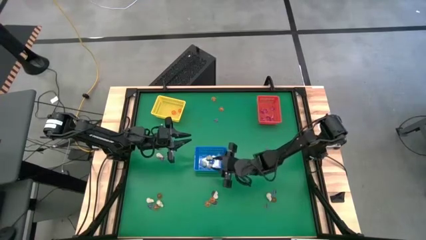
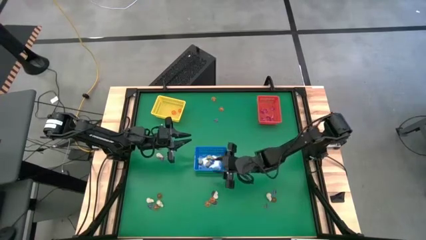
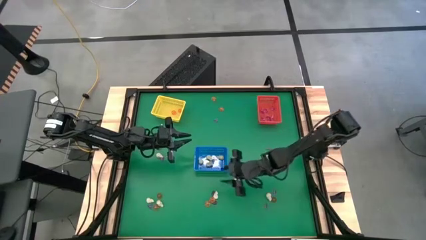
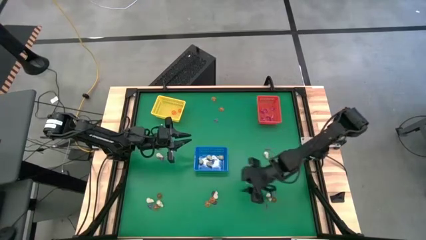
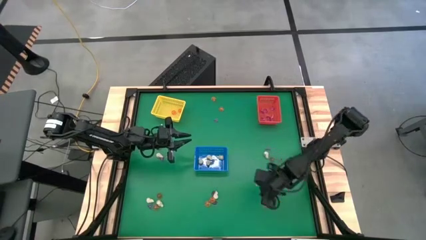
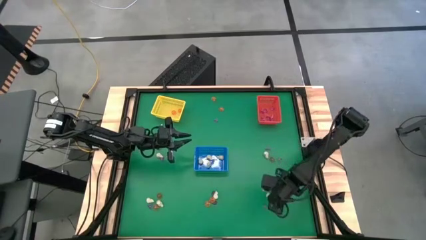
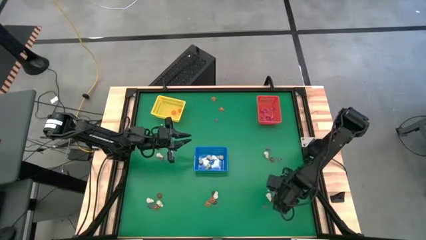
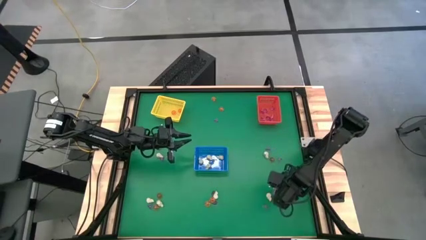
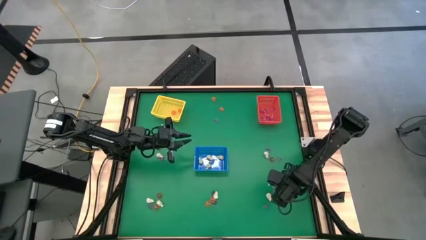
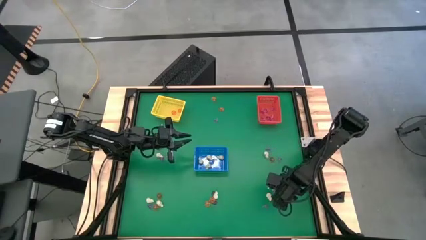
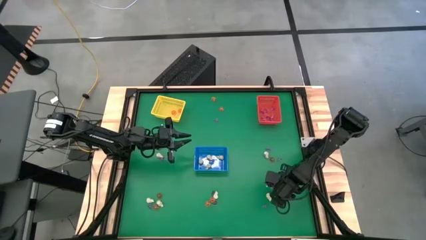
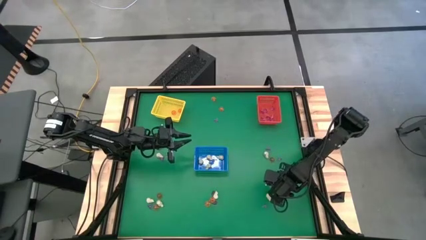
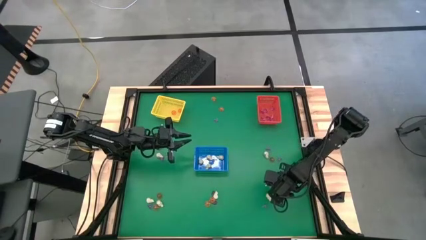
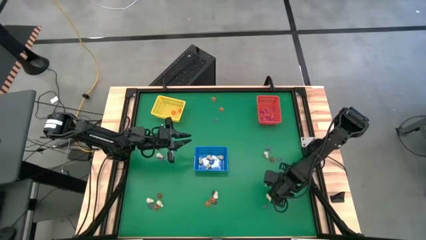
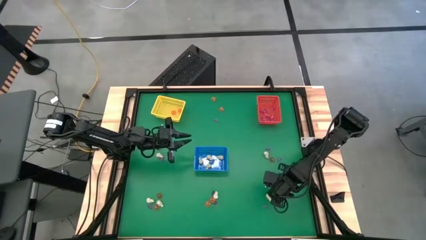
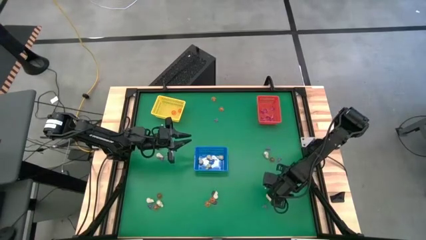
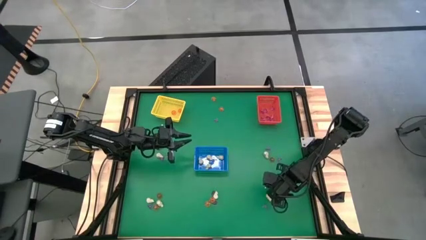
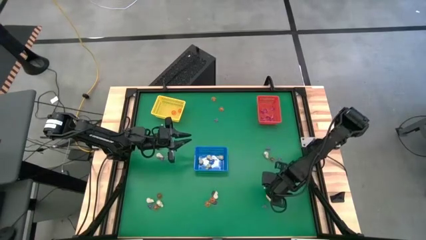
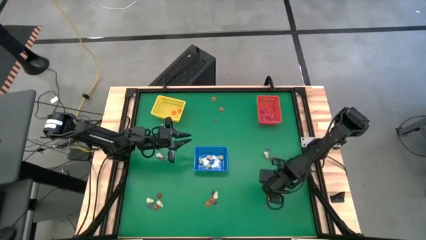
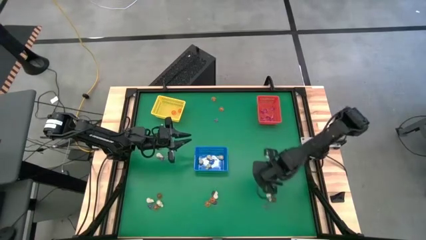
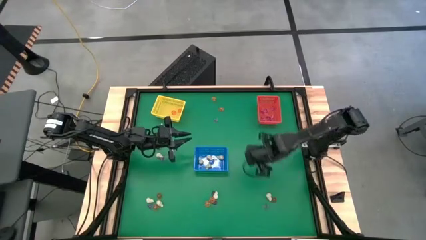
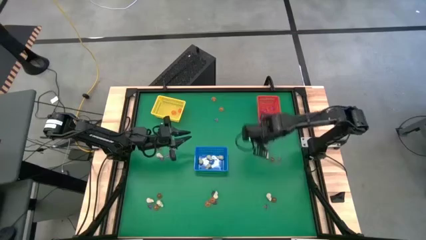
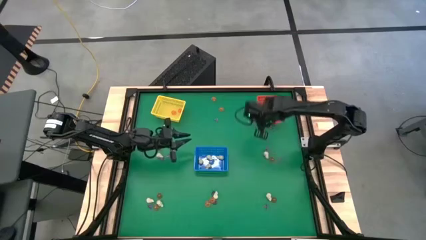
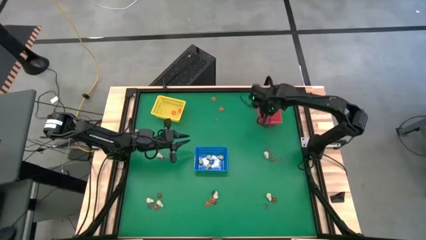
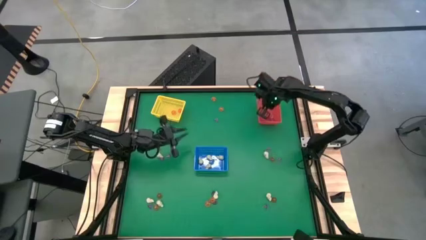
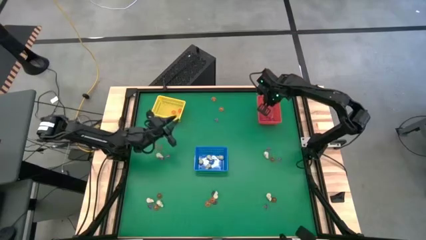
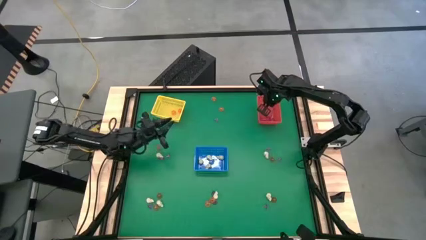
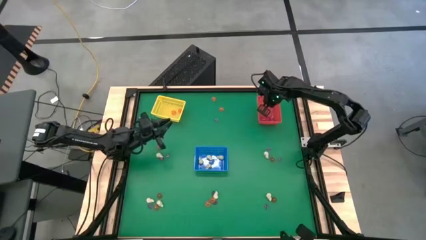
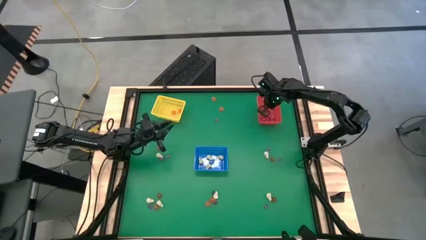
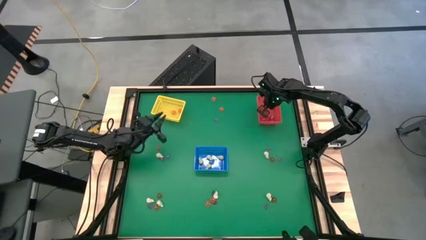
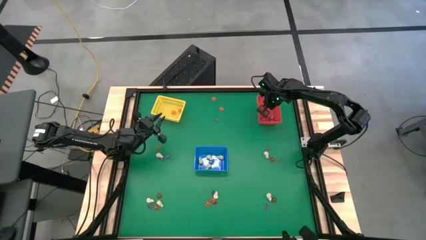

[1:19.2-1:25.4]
Task: Sort Halloween decoration
Put the purple witch hat toy into the red bin

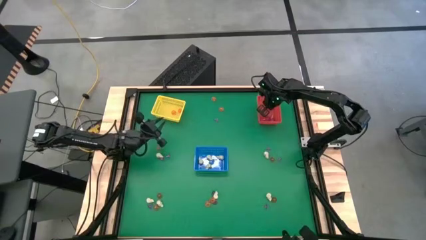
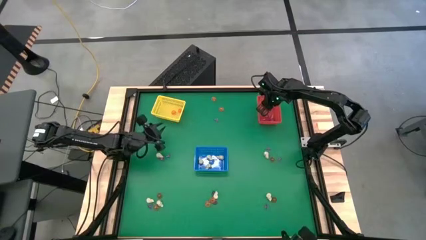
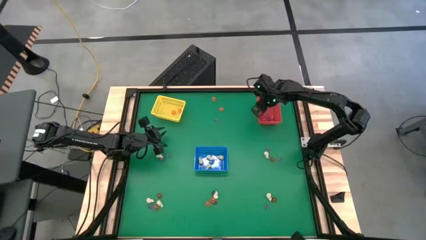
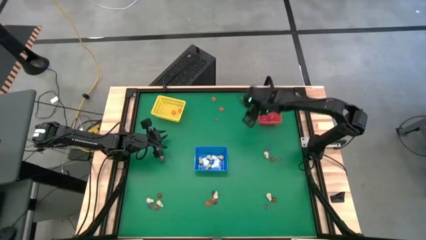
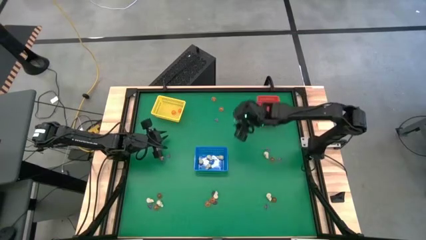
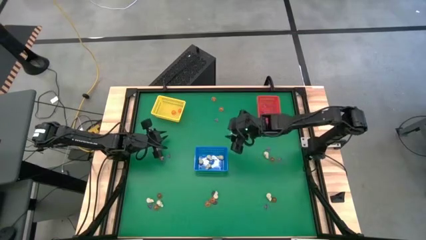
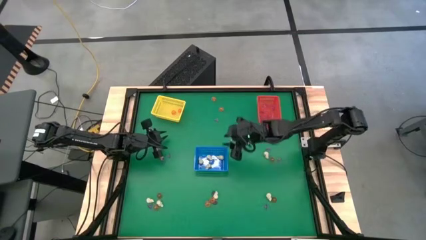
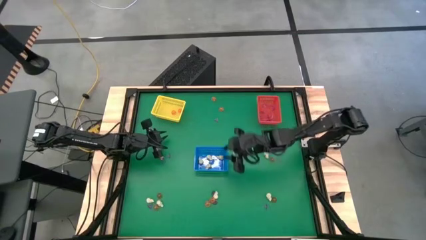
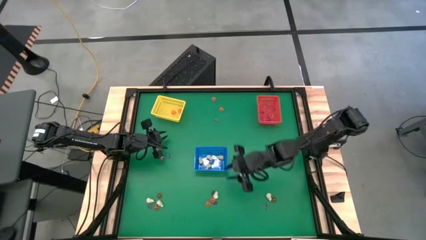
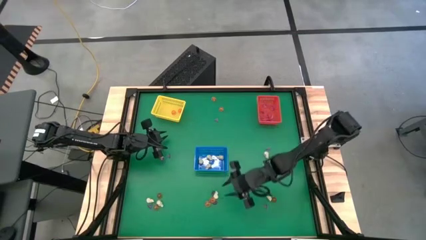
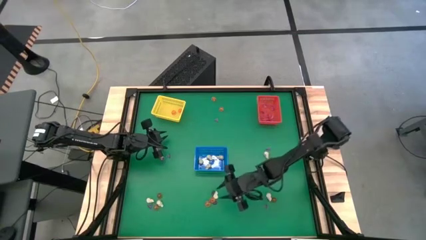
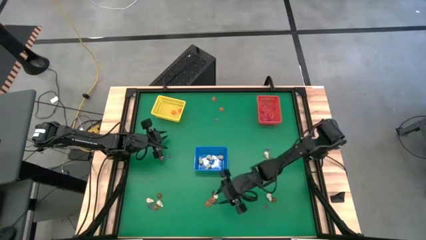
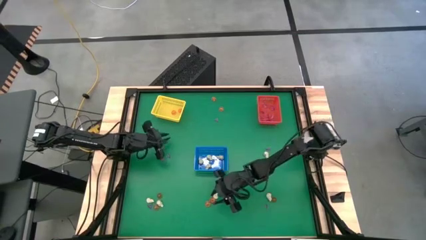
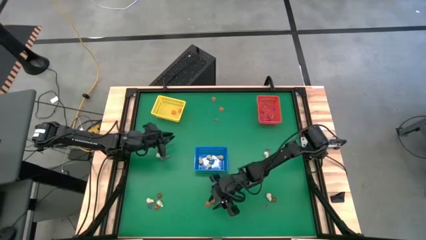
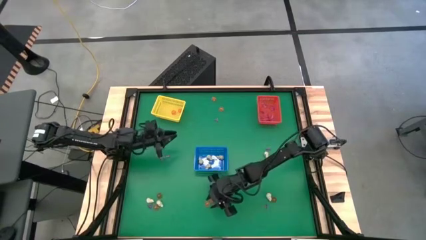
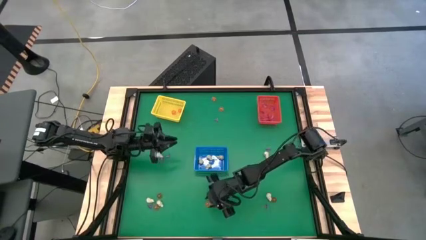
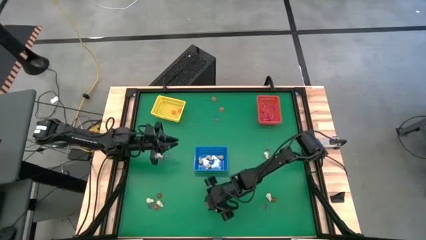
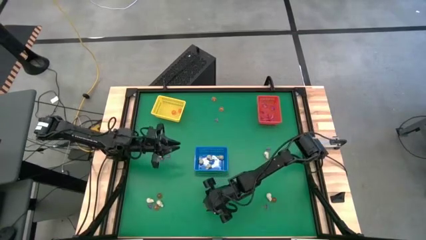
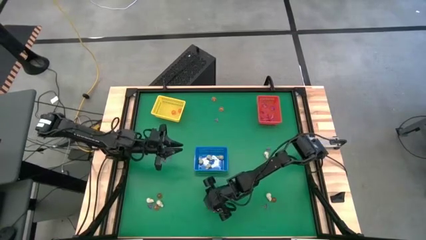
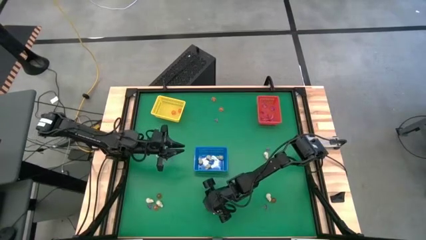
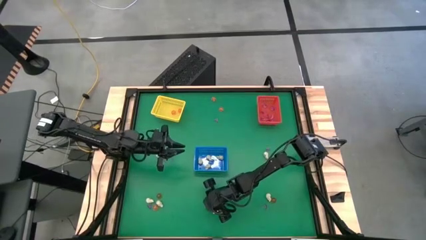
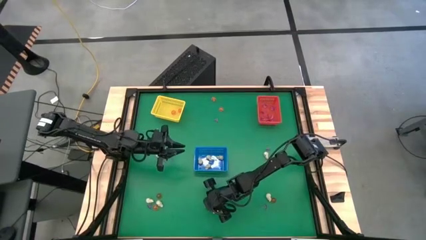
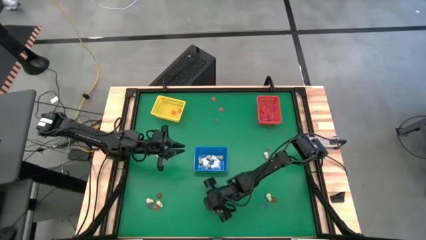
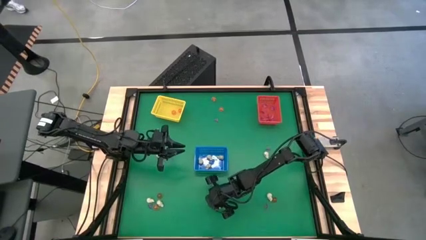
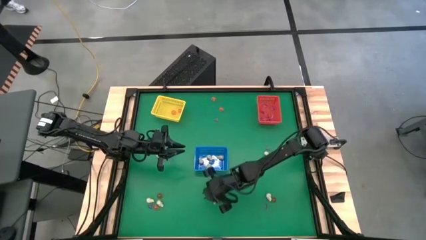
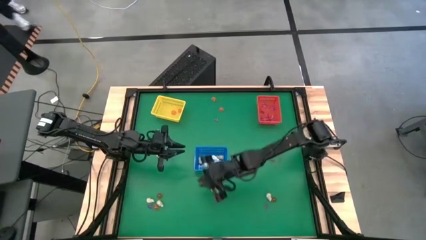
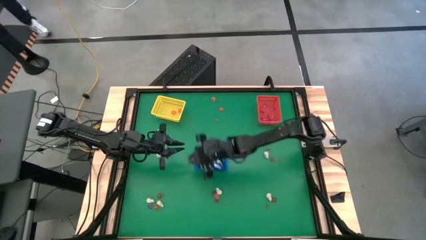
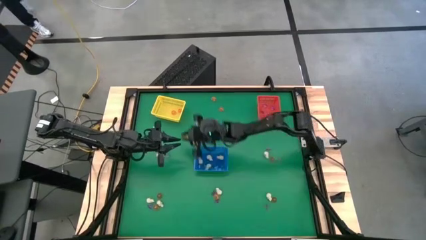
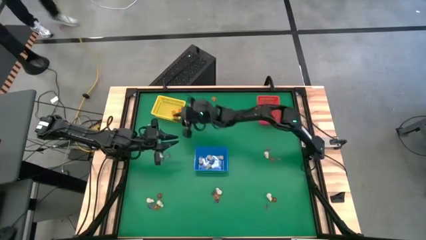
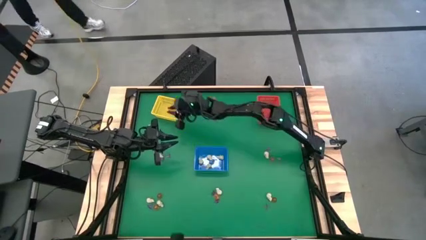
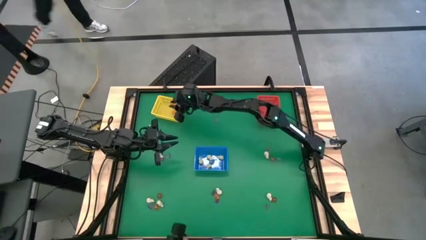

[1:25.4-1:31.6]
Put the orange pumpkin toy into the yellow bin

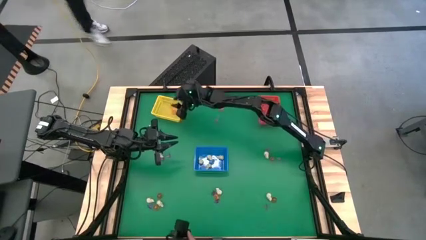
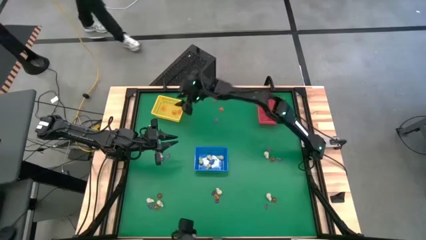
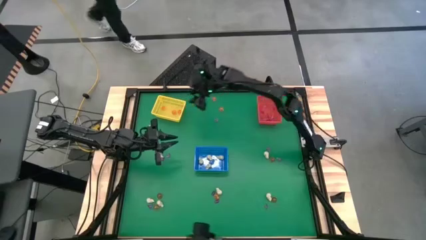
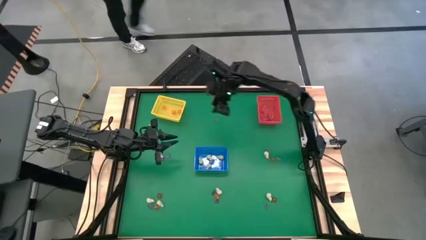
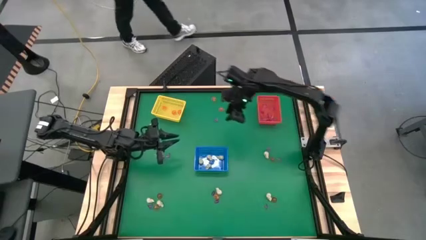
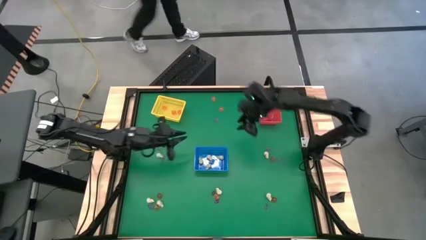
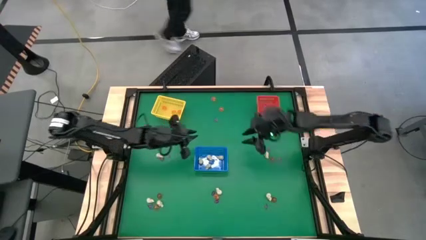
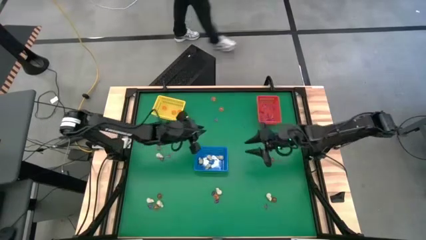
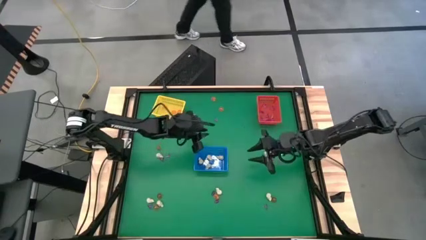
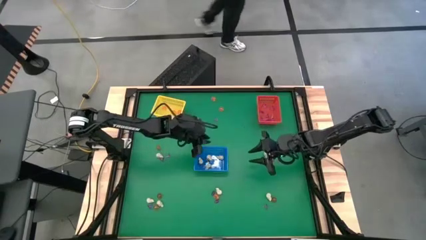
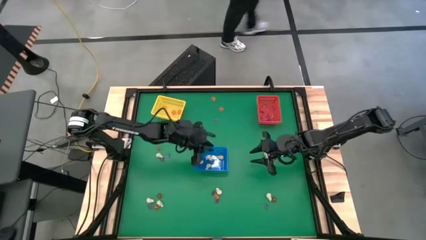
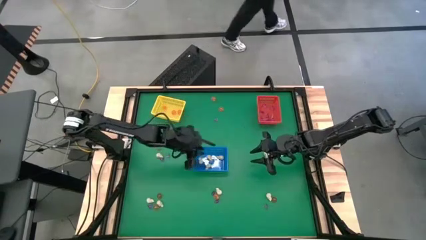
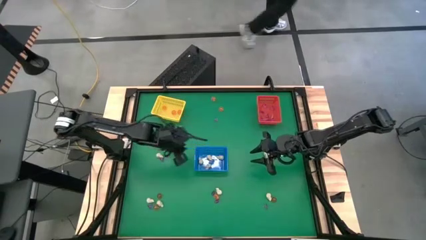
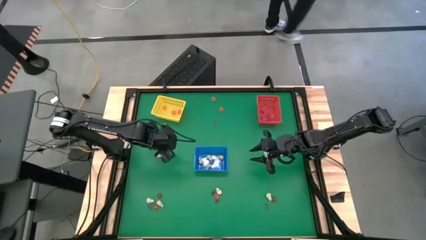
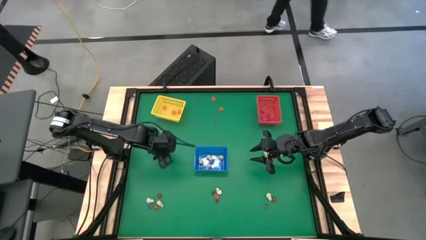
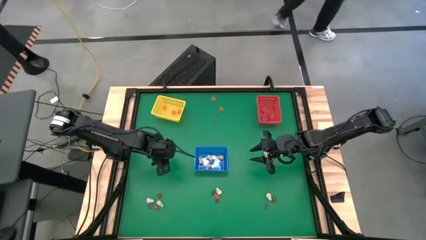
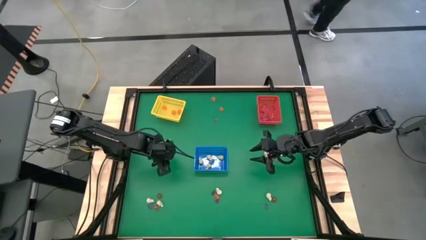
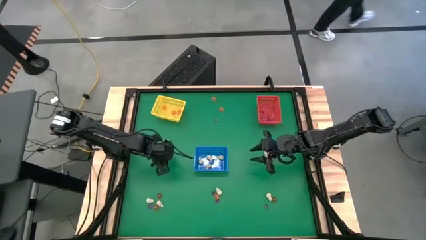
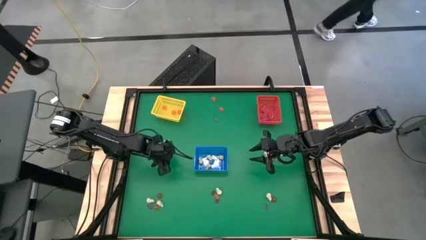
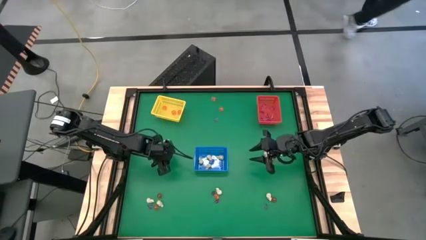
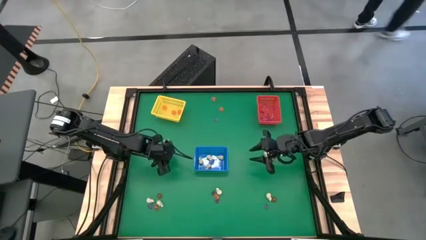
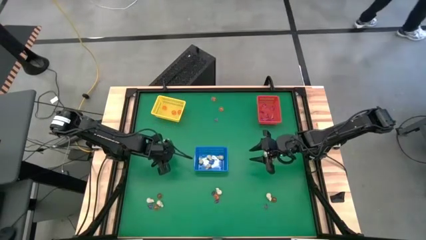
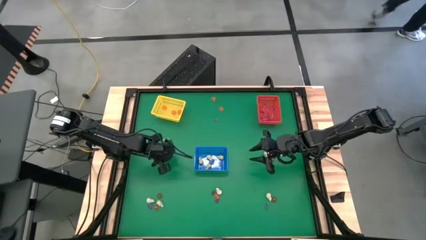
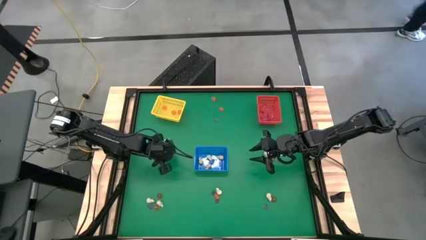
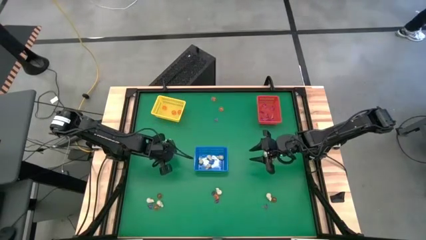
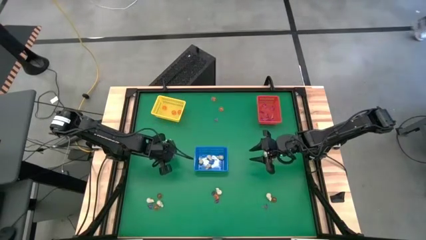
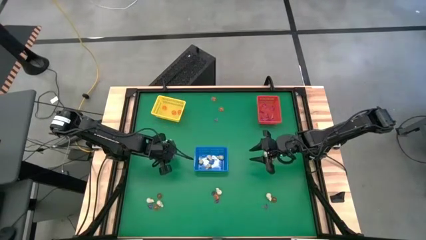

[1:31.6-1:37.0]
Put the purple witch hat toy into the red bin
